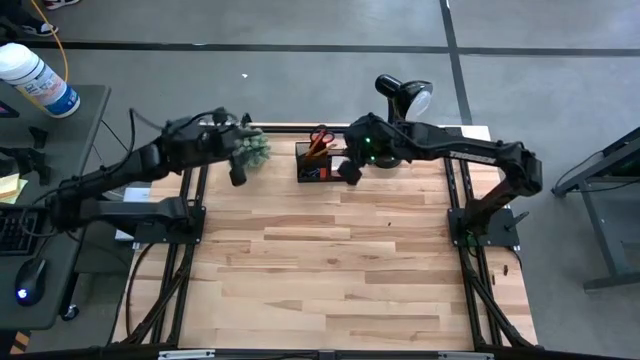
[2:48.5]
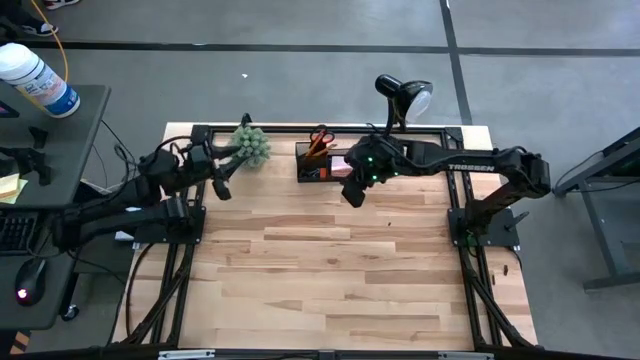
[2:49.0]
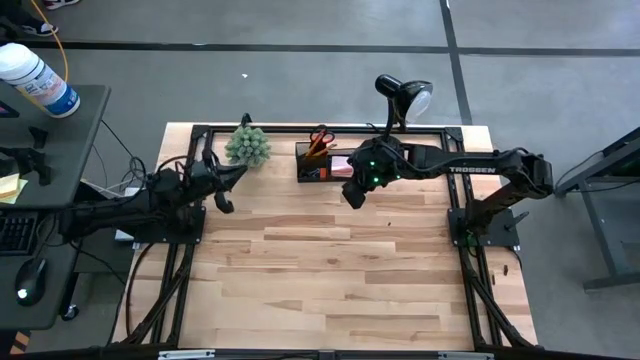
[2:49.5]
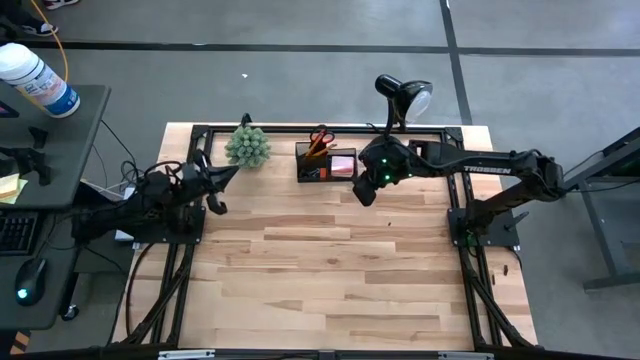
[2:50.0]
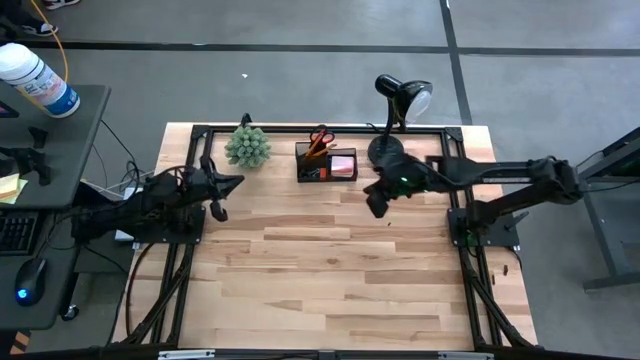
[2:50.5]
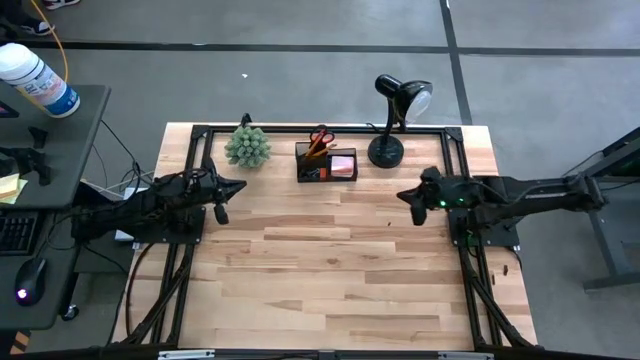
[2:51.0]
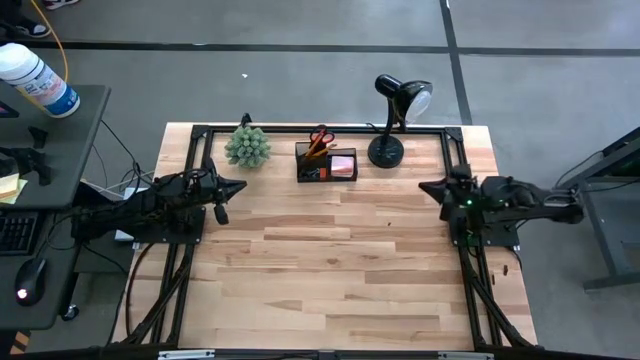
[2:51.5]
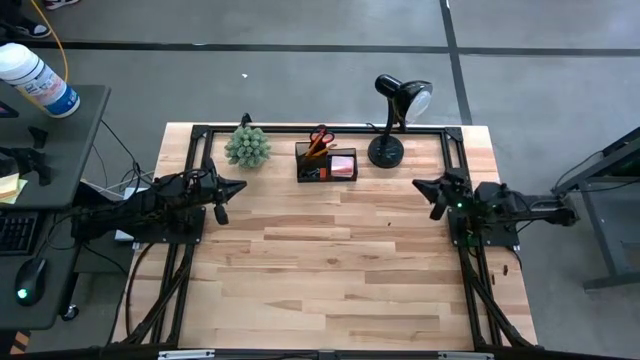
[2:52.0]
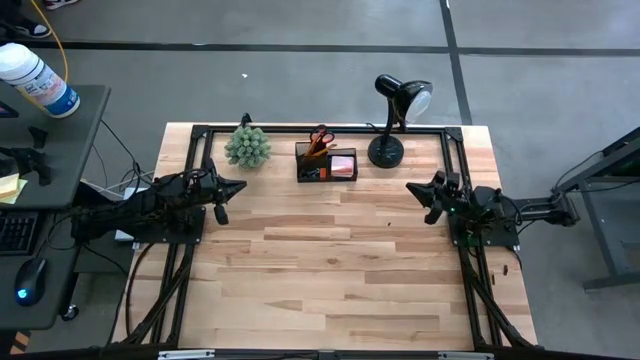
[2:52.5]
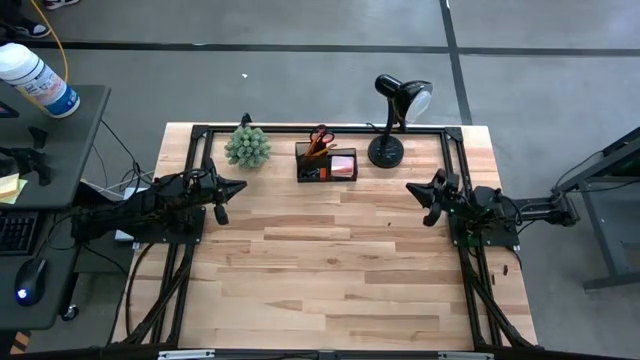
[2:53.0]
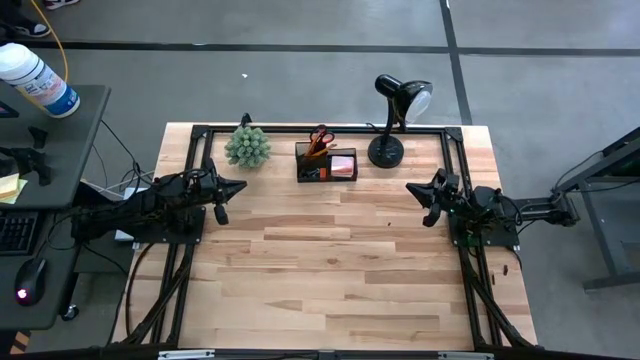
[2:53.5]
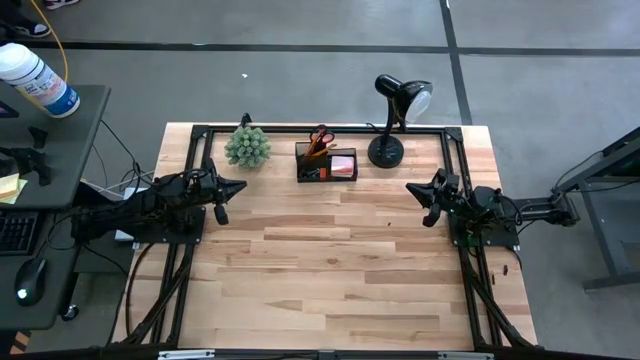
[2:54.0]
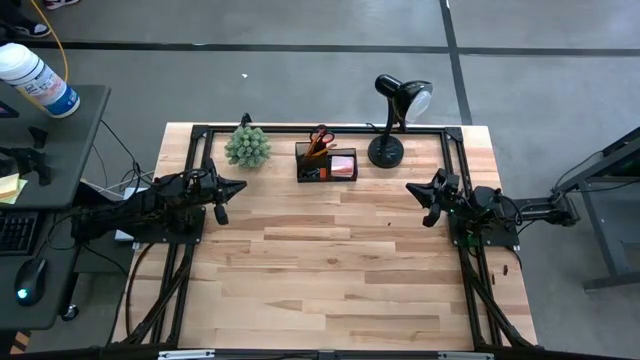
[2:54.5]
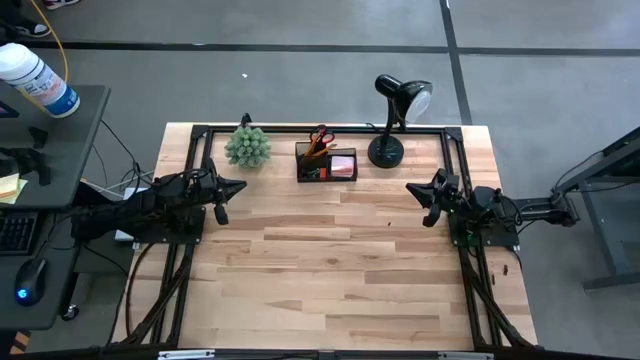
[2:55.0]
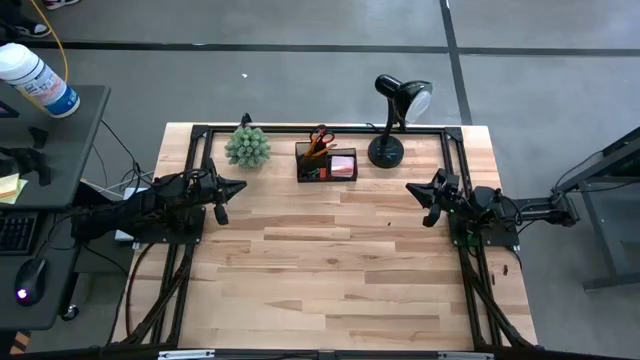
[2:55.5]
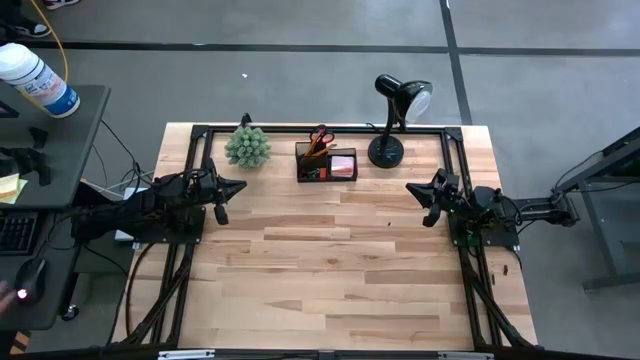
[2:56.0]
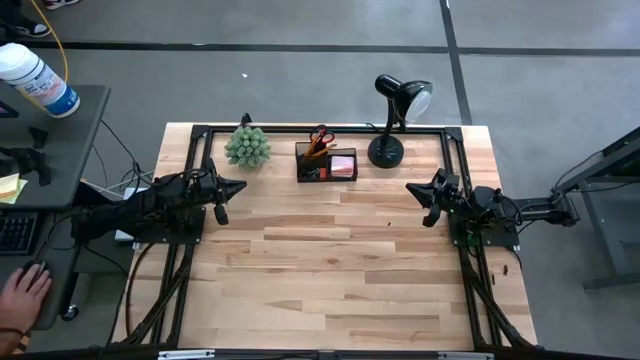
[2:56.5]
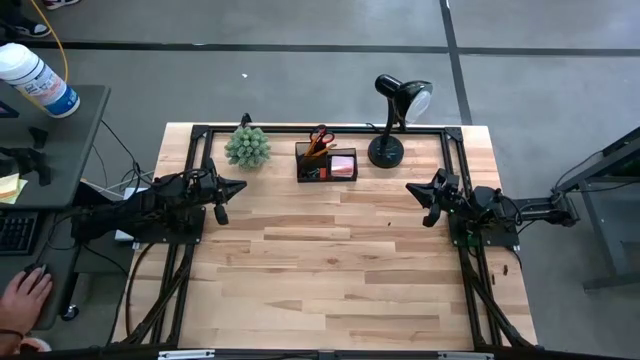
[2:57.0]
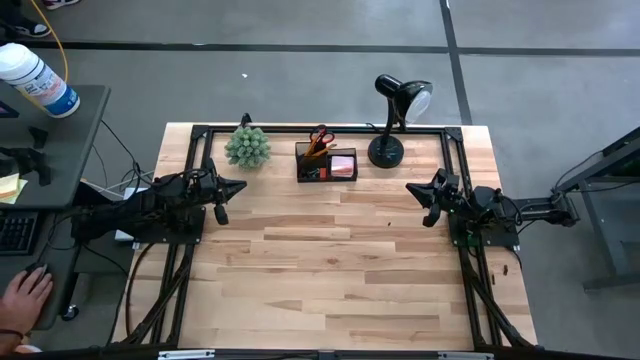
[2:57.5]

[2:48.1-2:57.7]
Task: Pick and place office supplies into organizer
Return to Home Position

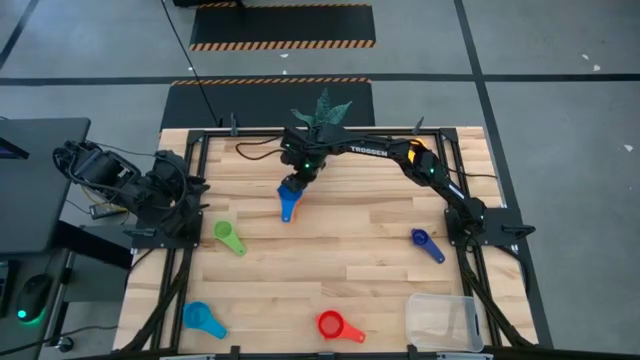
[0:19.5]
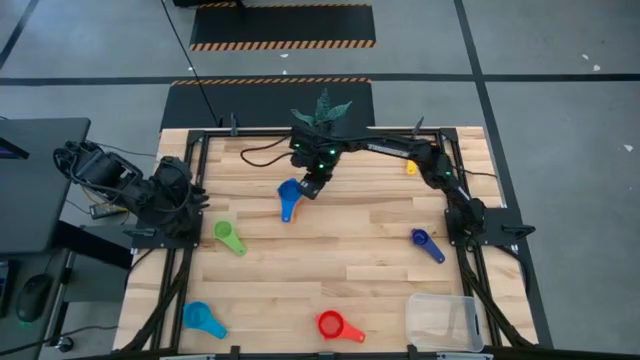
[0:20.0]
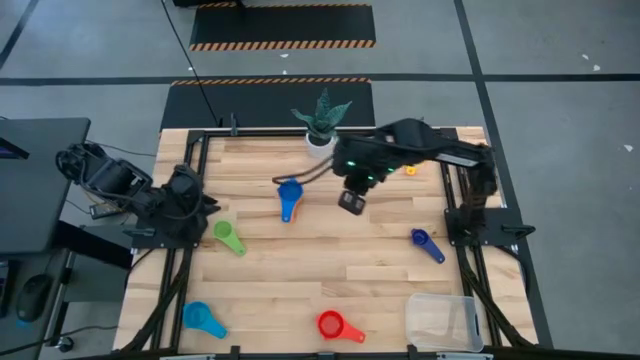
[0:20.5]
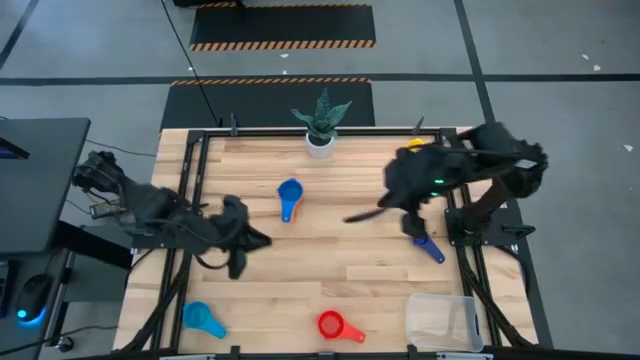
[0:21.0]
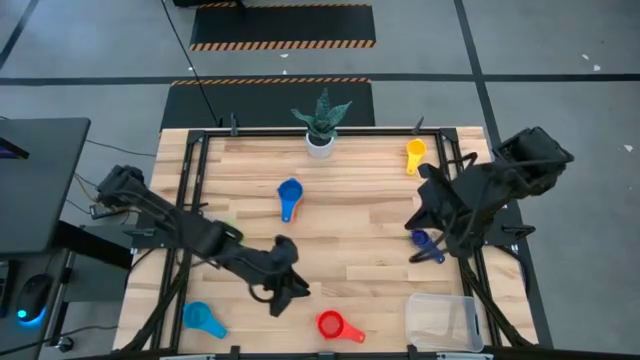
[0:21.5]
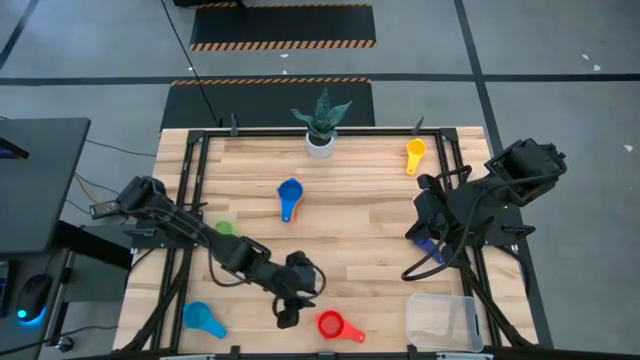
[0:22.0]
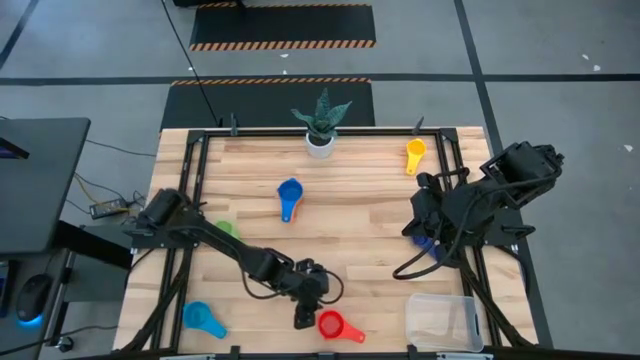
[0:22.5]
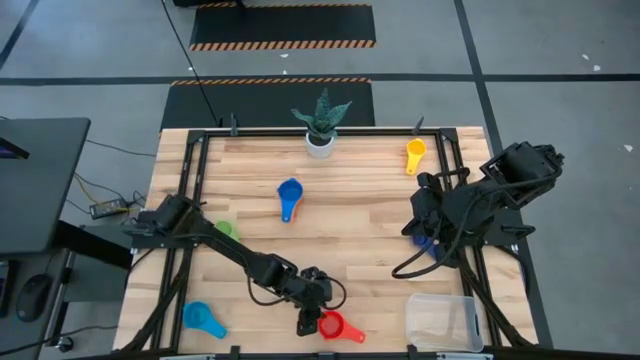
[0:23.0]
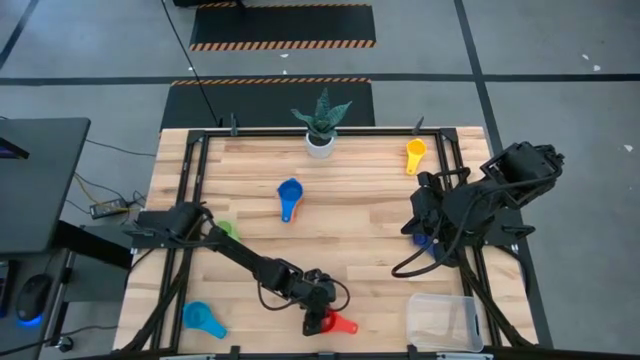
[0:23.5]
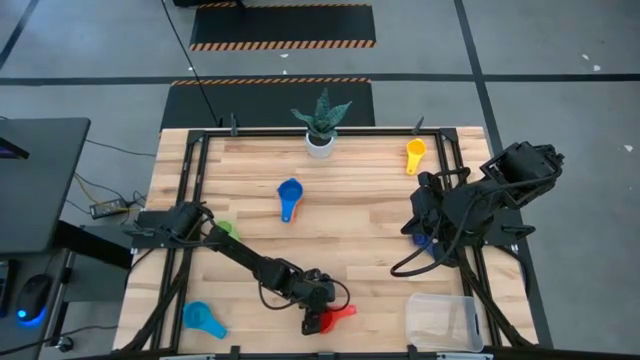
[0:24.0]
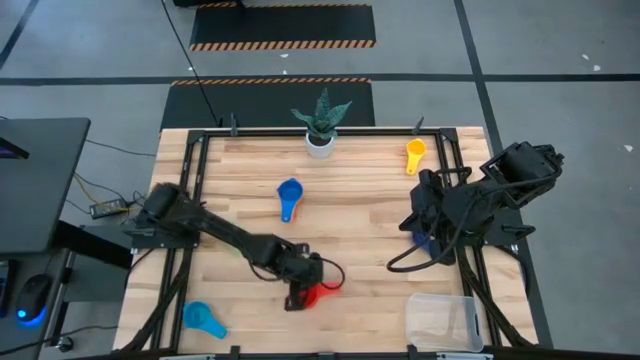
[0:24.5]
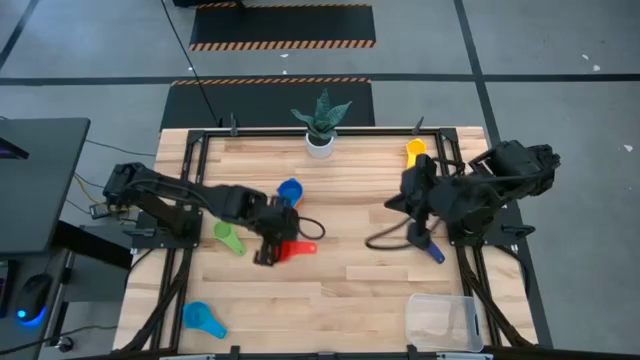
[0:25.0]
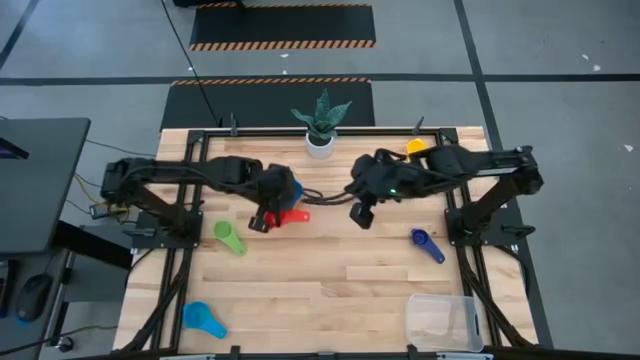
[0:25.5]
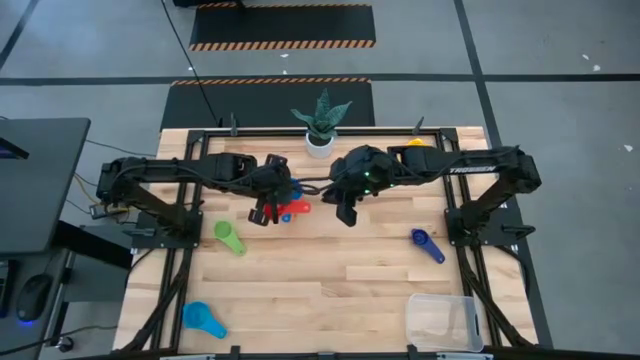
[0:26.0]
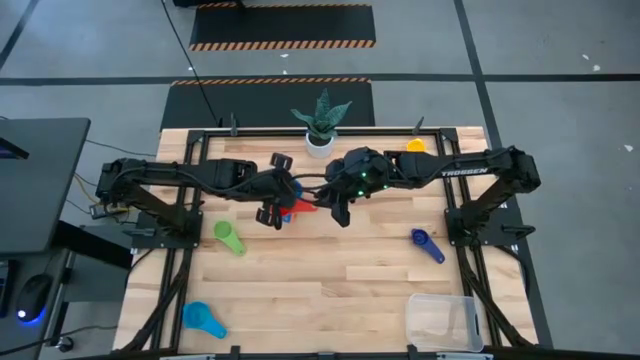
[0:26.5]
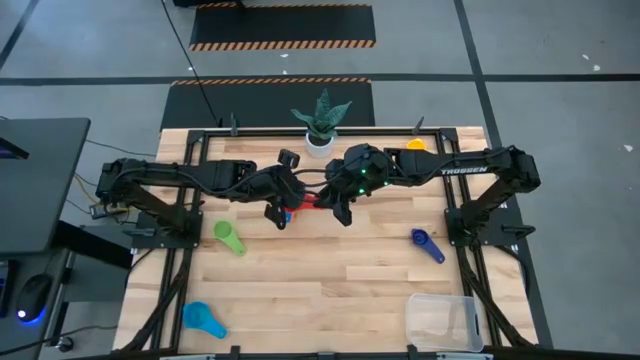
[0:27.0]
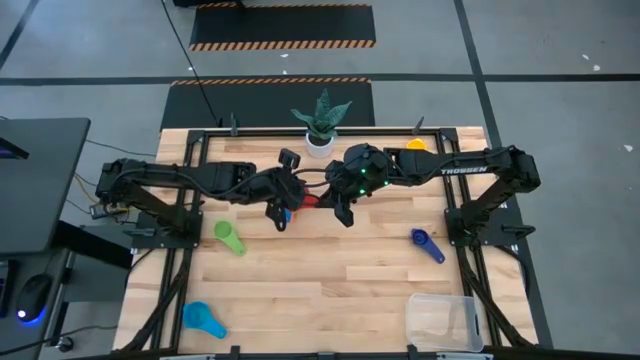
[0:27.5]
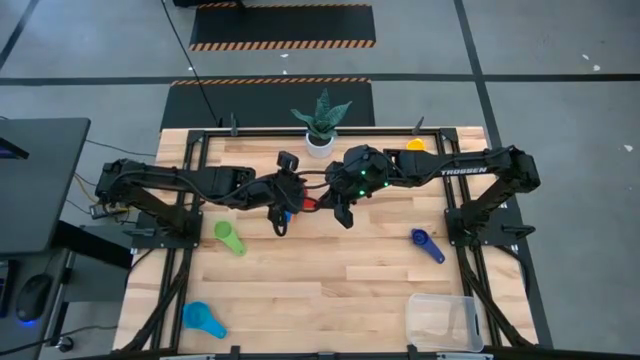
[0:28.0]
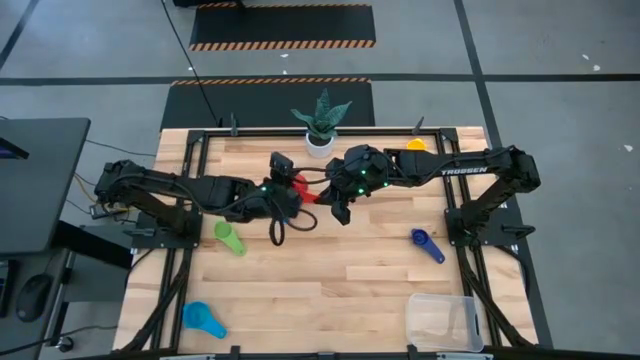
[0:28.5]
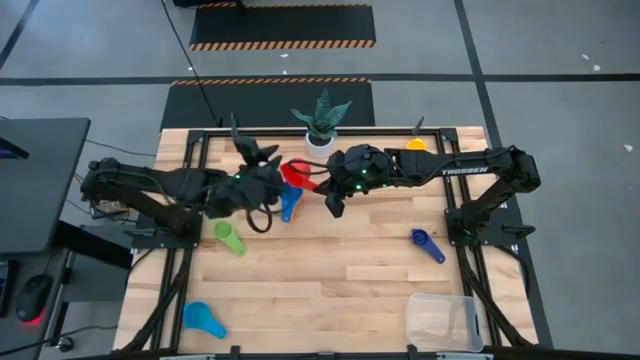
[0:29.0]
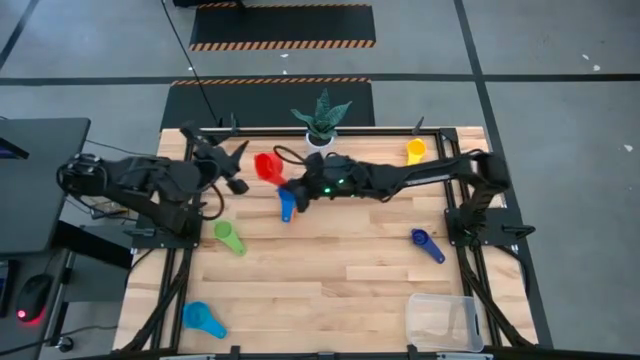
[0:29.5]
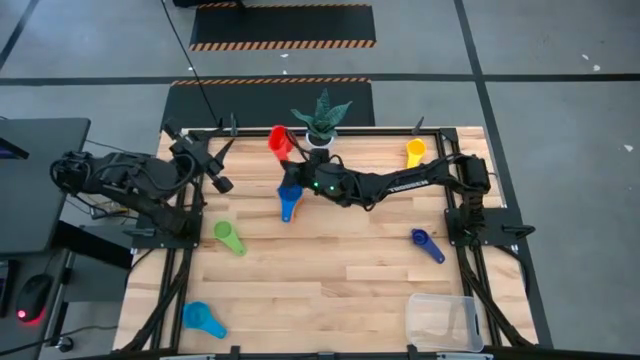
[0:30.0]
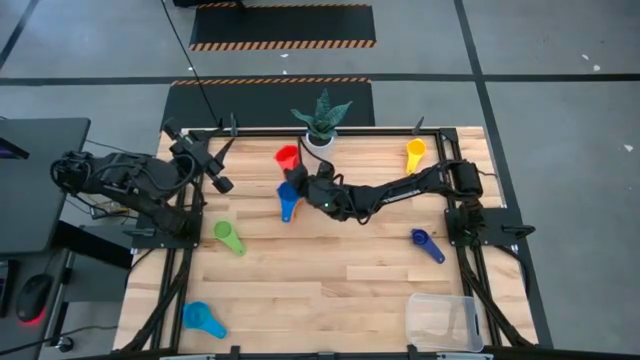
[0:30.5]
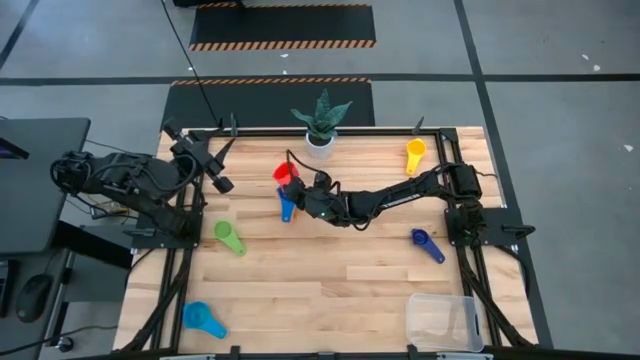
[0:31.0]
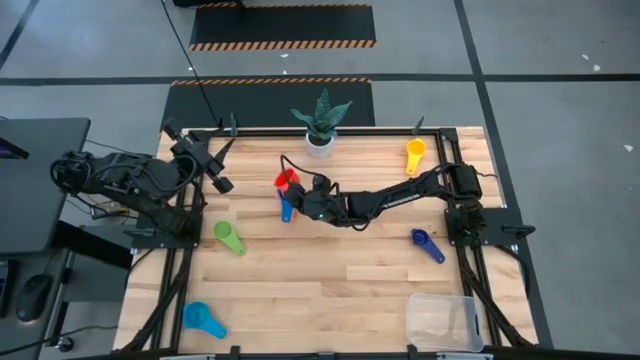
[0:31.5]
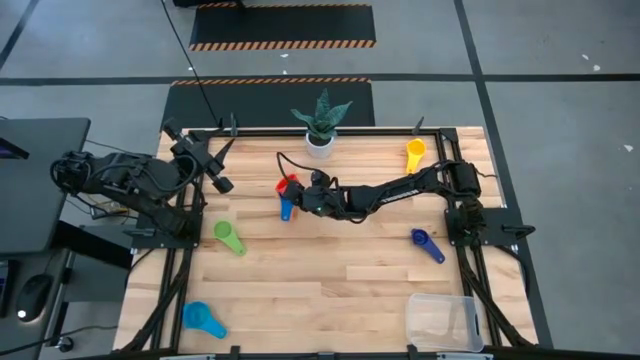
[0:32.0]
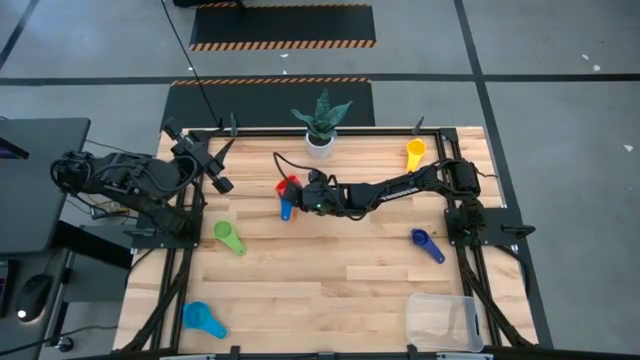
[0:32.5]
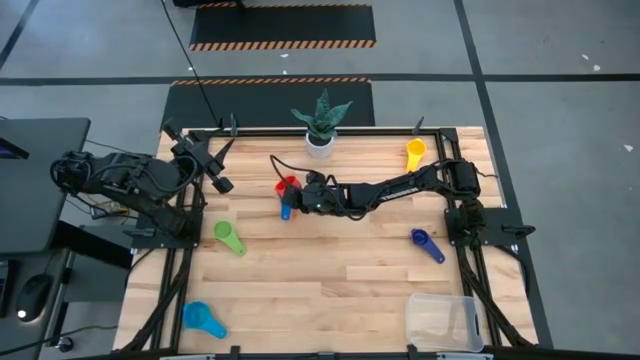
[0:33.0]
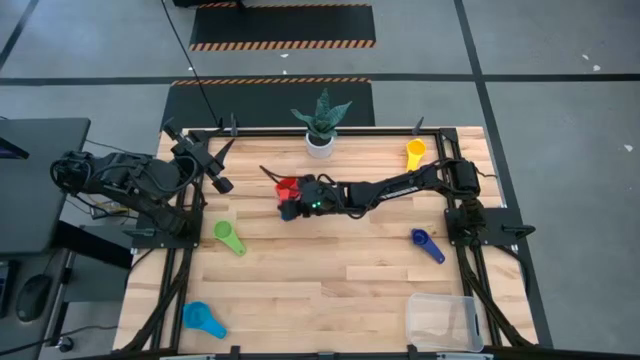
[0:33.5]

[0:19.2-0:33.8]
Task: Nest measuring cups in basket
Stack the red measuring cup on top of the light blue measuring cup
